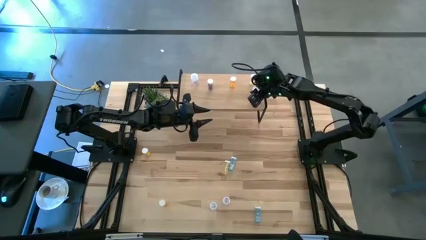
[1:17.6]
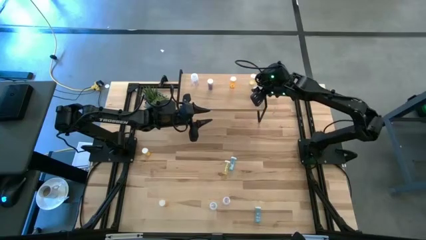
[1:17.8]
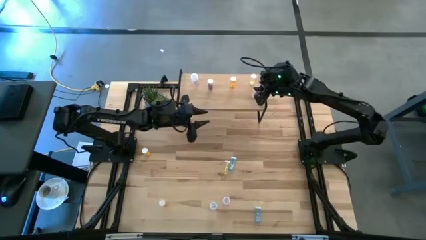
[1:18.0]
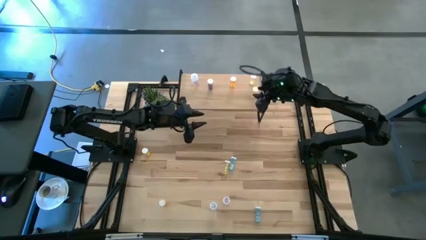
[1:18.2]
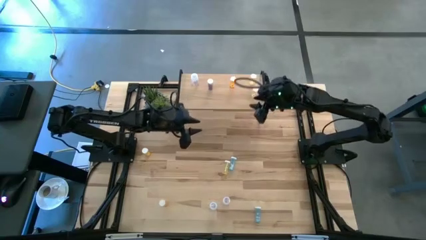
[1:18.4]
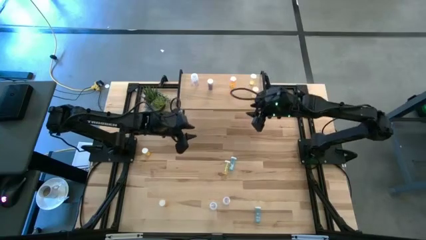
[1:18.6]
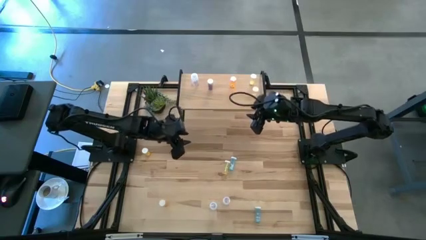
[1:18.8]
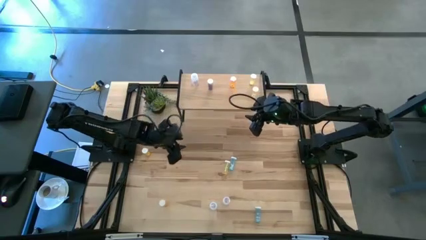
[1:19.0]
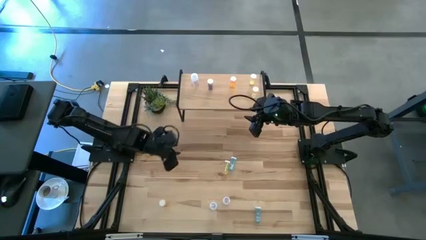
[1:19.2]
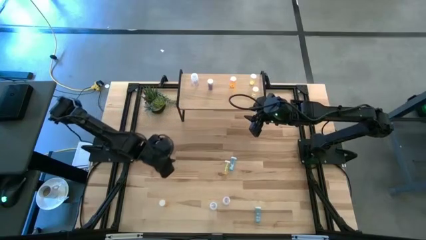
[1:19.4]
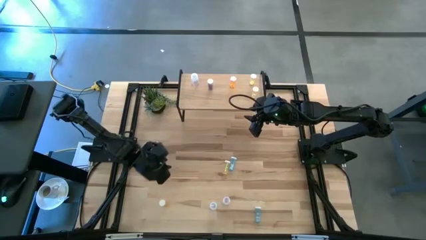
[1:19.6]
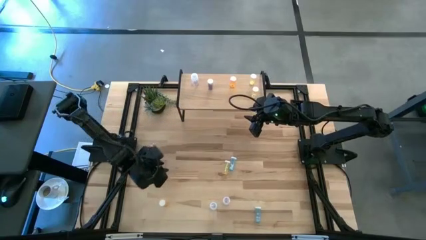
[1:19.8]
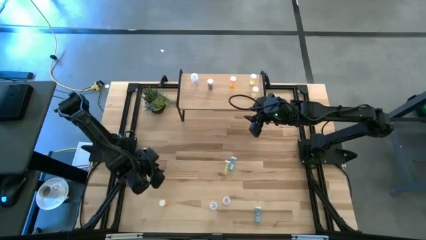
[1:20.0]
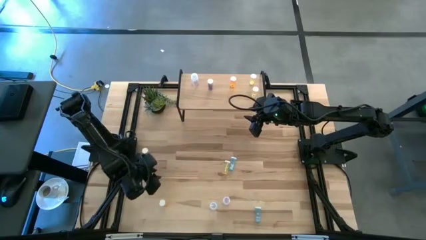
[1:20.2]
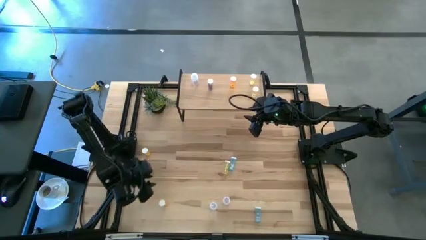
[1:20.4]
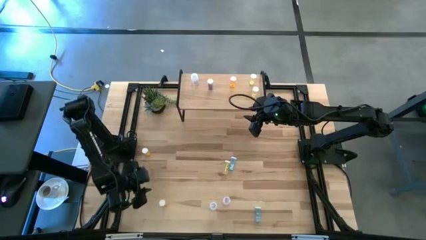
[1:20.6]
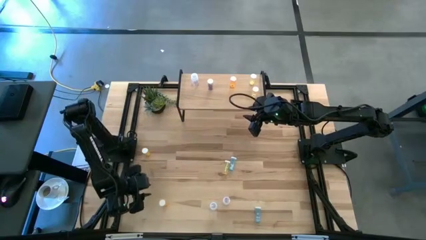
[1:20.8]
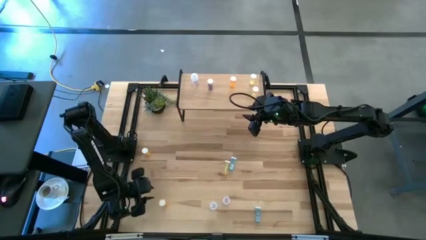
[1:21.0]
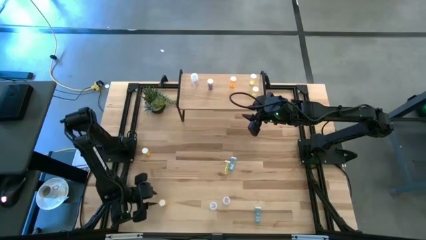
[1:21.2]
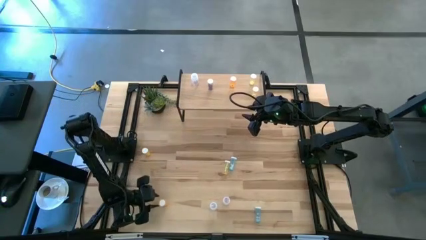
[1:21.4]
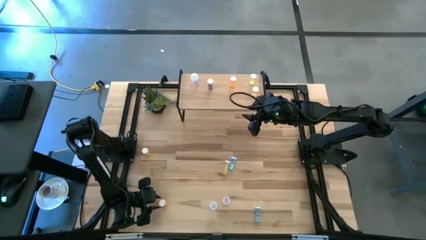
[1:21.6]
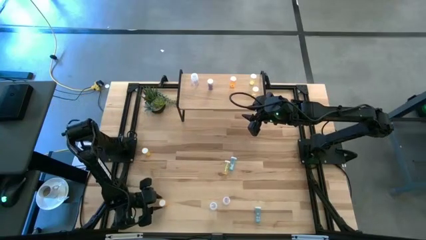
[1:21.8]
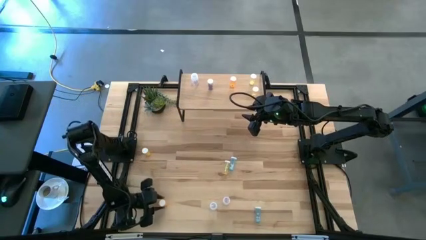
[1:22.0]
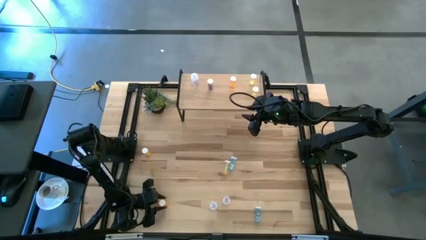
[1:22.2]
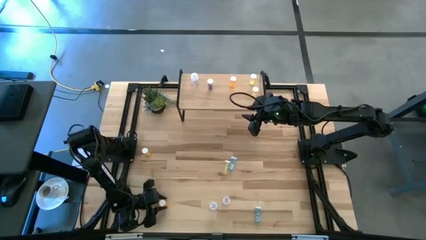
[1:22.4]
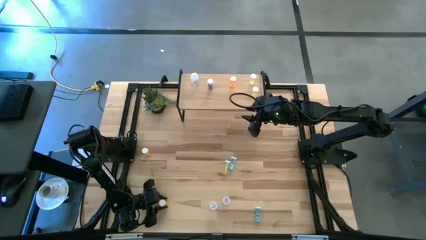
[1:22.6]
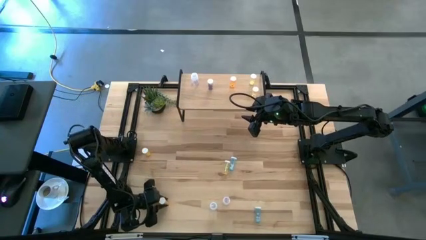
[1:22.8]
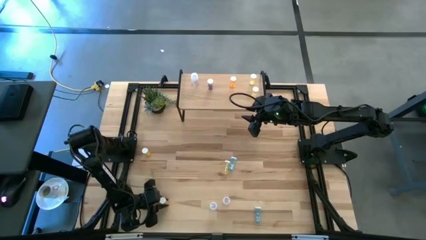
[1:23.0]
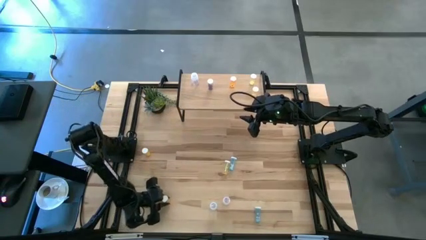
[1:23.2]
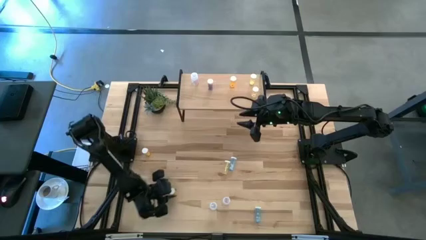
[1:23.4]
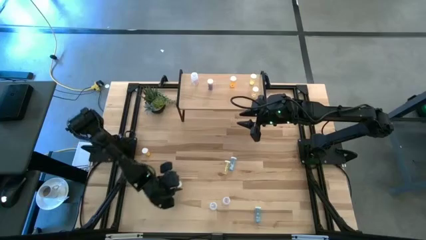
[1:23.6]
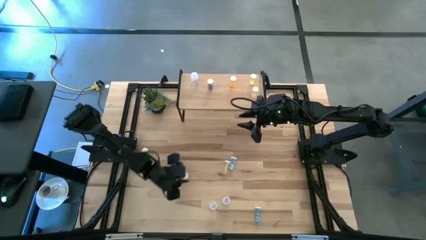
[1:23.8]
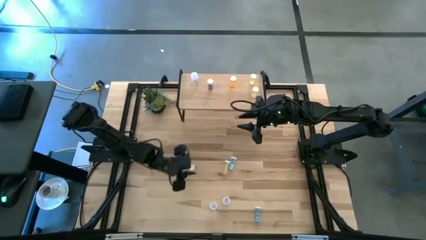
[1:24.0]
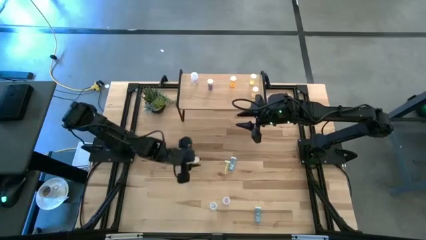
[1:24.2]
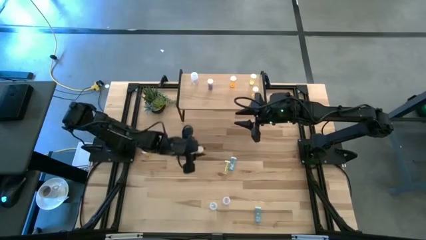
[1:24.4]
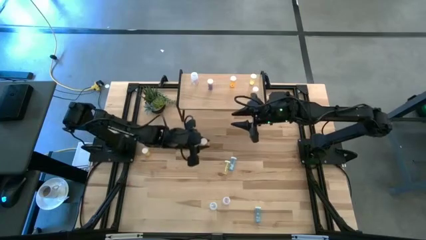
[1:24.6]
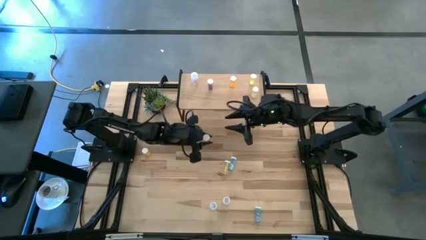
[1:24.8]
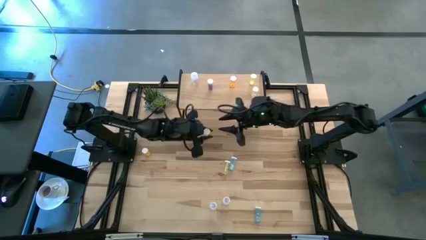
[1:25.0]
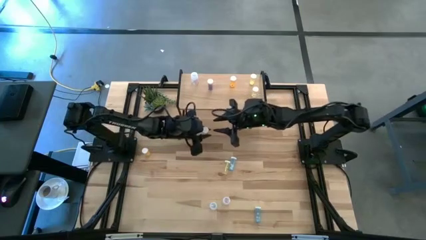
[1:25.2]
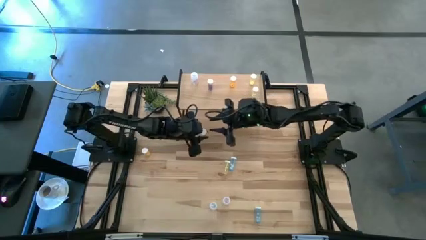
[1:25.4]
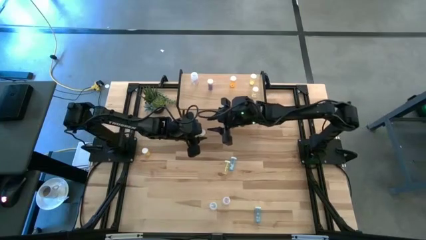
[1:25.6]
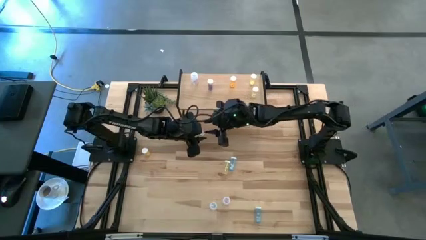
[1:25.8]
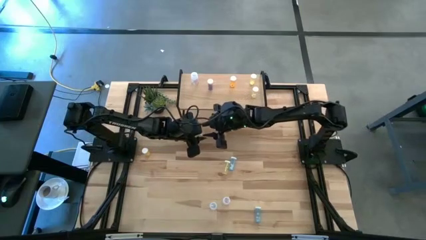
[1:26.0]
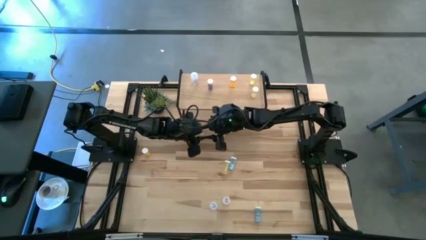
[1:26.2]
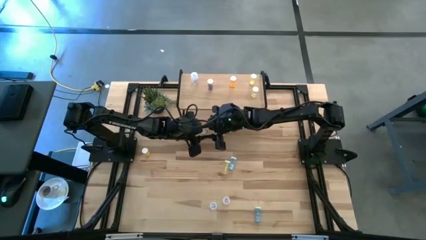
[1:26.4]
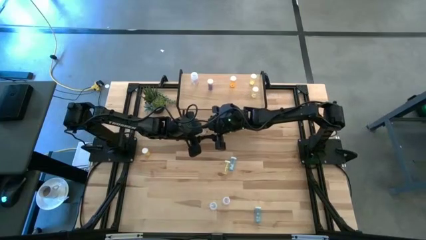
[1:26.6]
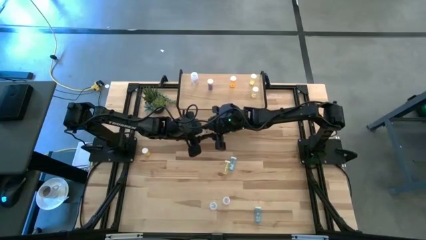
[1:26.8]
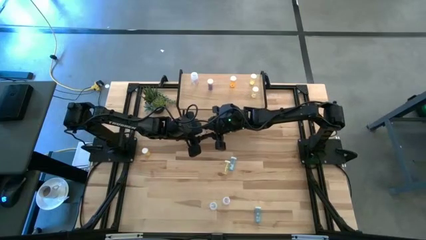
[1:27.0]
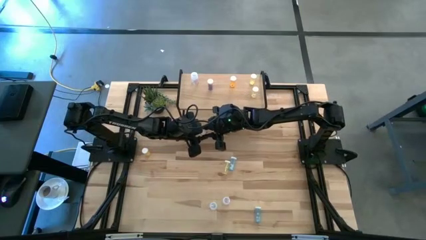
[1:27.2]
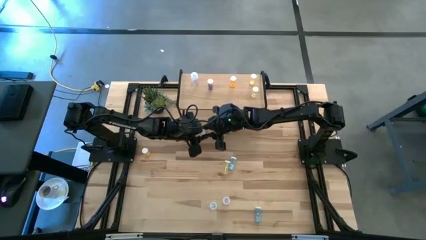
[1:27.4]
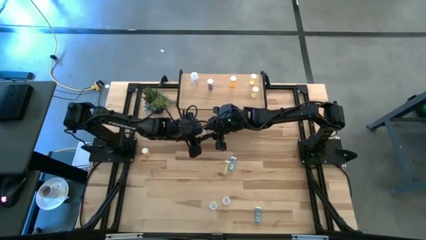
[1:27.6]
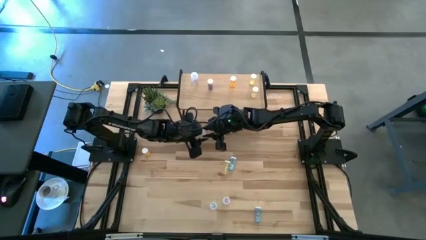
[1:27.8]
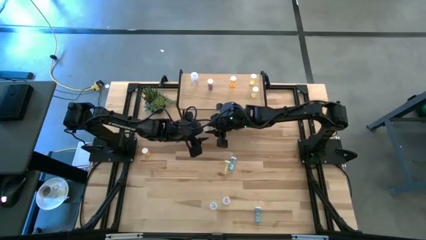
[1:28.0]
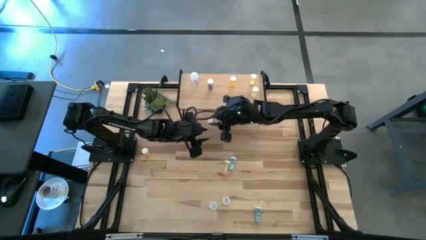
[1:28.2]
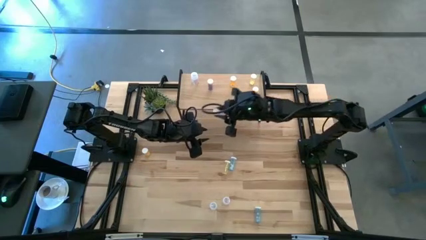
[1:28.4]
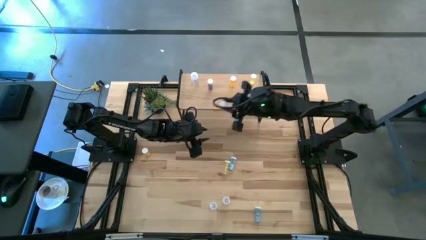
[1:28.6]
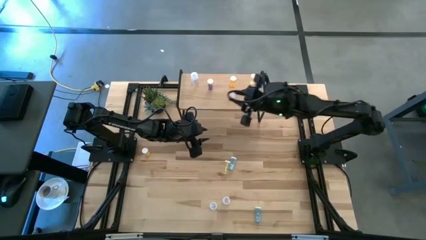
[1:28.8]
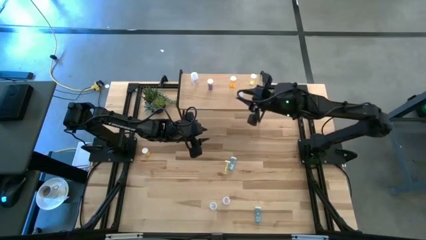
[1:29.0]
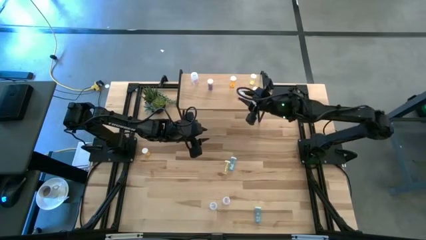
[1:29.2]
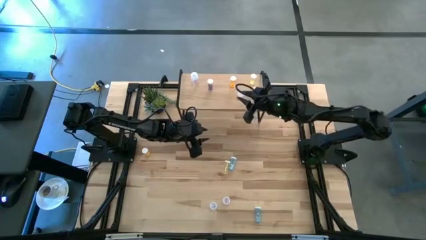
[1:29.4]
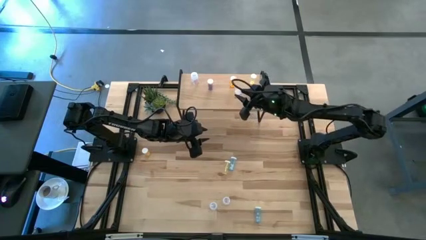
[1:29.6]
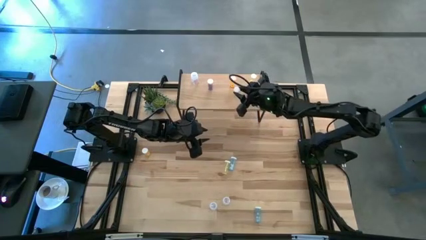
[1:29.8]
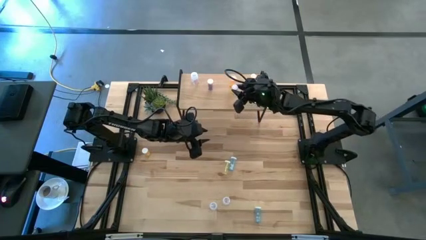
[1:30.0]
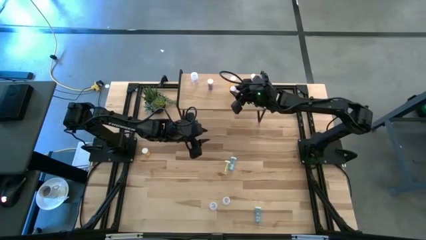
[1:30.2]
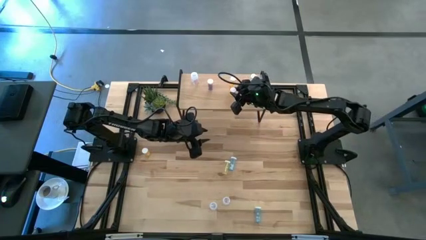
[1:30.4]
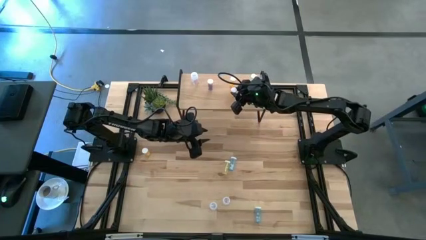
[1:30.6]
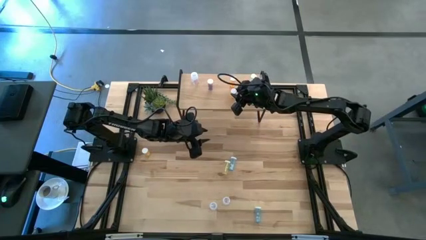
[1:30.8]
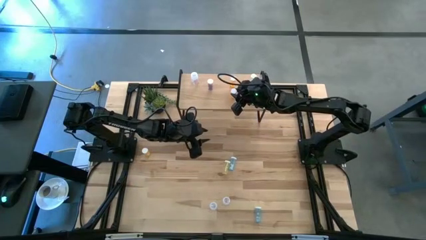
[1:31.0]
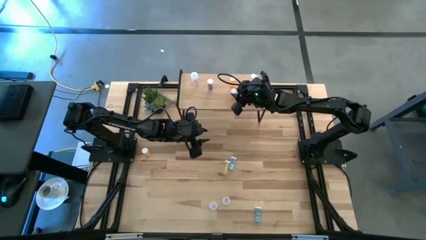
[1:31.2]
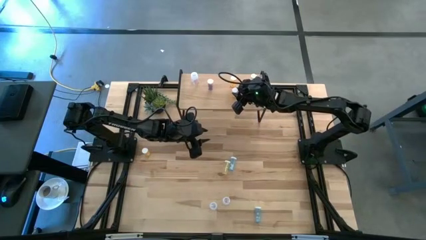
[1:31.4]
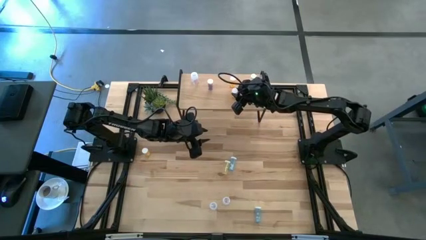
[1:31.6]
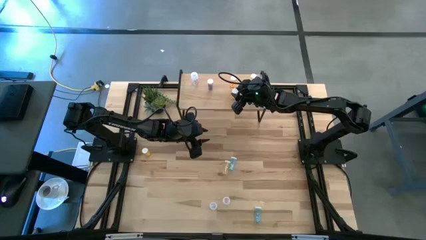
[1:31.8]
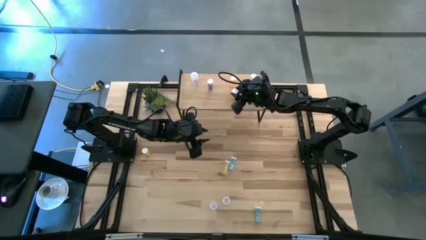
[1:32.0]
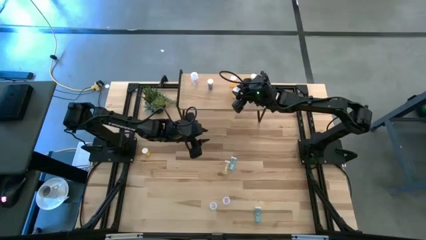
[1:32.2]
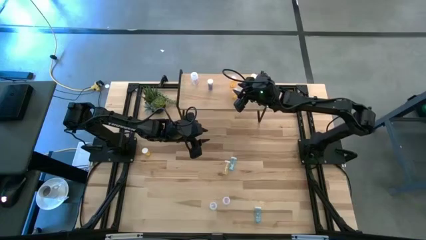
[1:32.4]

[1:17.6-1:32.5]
Task: Pick and place medicine bottles onto shelf by color
Put the bottom orange pill bottle on the shelf aligned with the orange pill bottle
